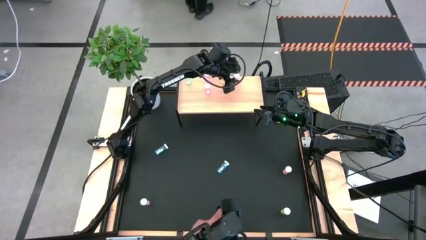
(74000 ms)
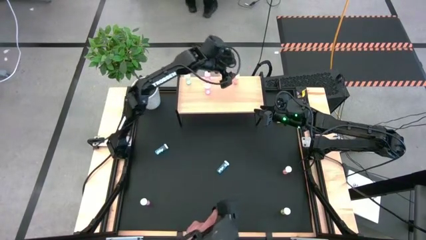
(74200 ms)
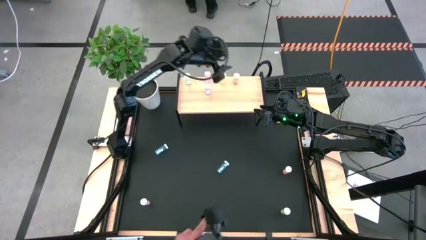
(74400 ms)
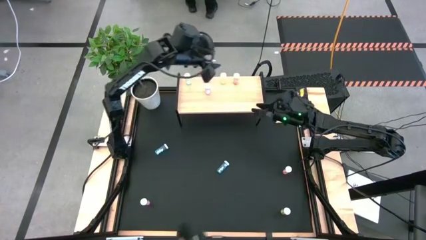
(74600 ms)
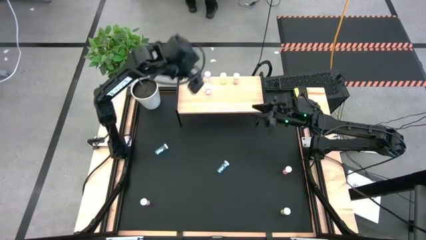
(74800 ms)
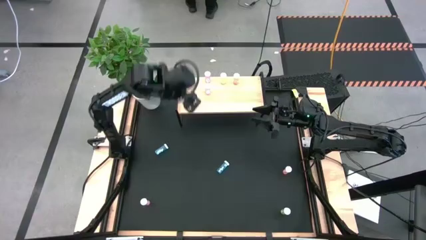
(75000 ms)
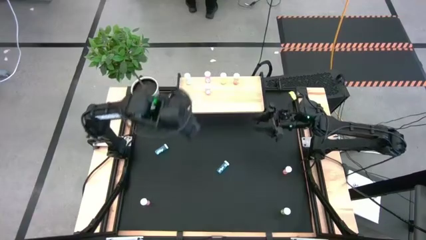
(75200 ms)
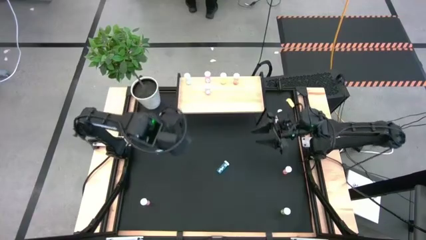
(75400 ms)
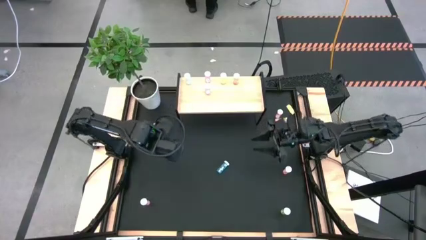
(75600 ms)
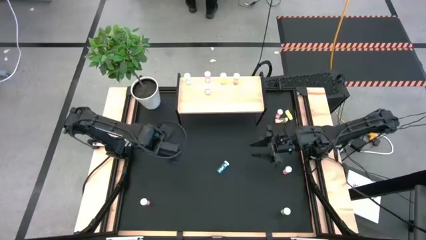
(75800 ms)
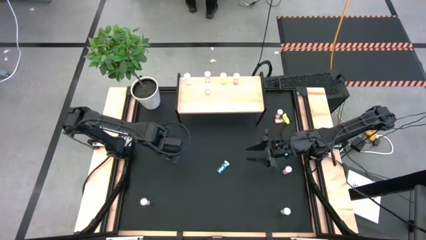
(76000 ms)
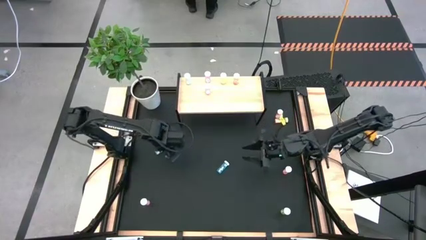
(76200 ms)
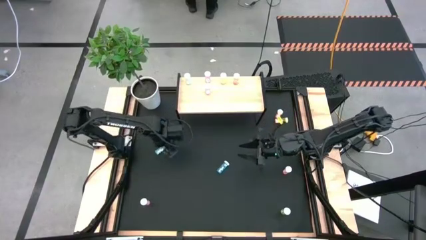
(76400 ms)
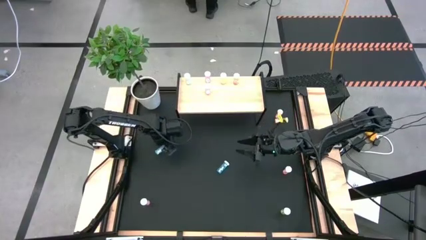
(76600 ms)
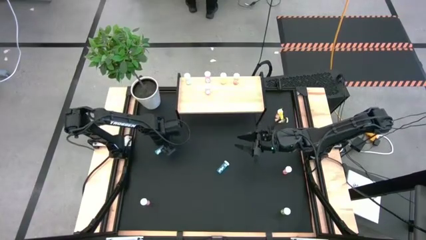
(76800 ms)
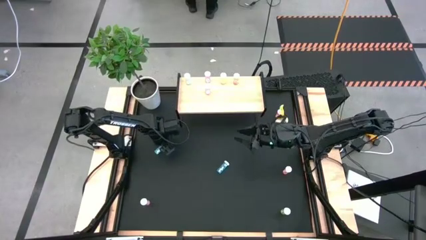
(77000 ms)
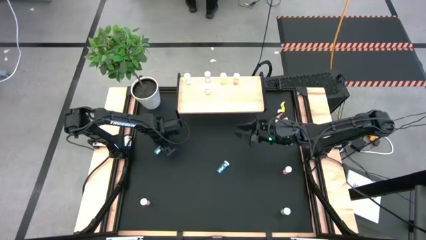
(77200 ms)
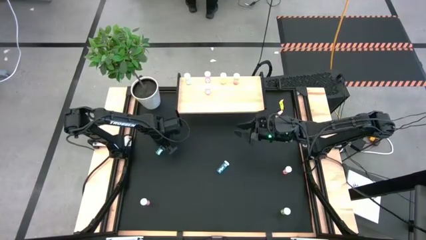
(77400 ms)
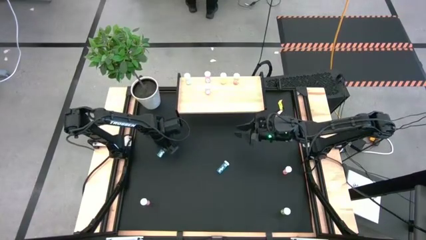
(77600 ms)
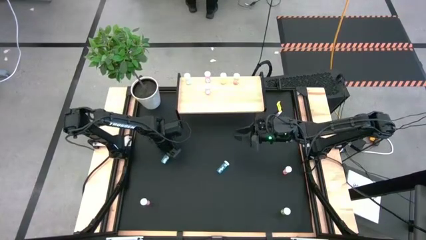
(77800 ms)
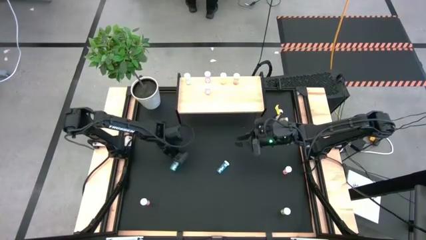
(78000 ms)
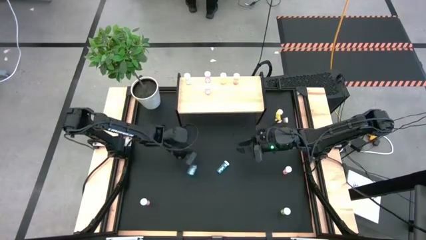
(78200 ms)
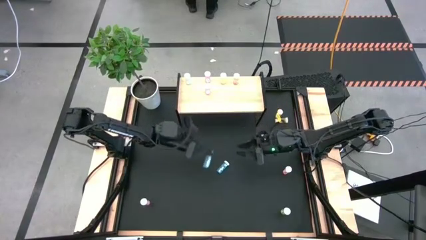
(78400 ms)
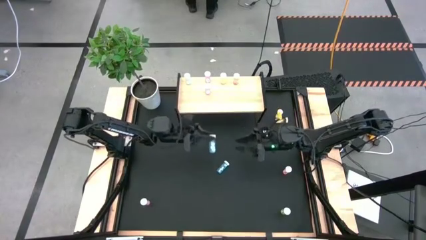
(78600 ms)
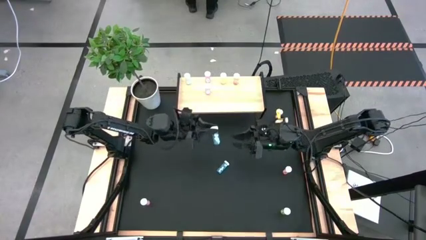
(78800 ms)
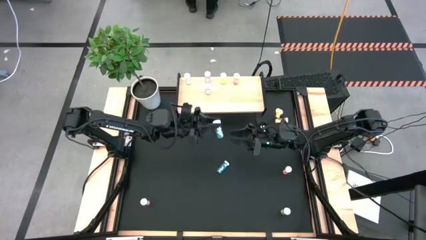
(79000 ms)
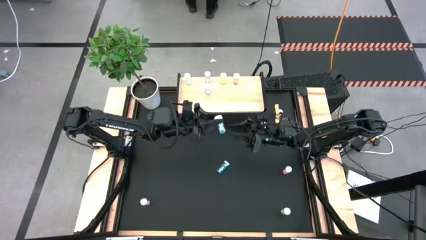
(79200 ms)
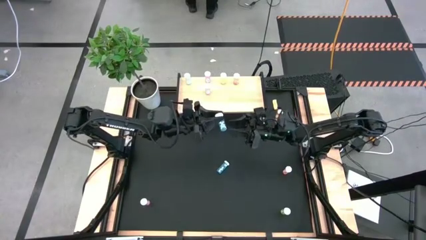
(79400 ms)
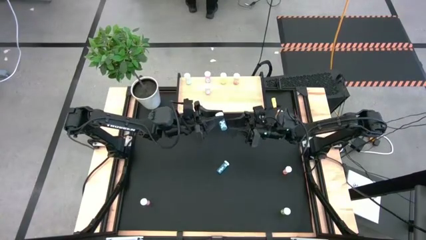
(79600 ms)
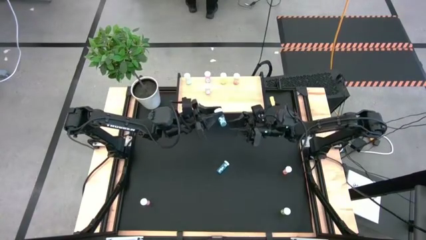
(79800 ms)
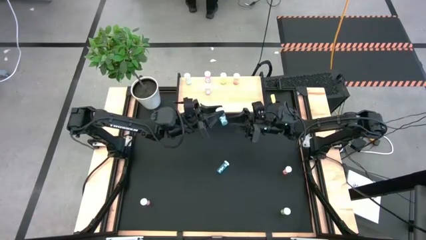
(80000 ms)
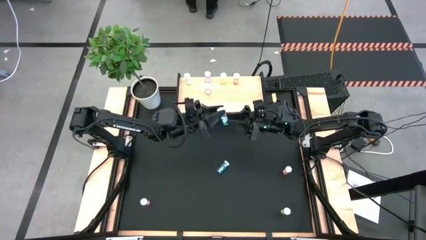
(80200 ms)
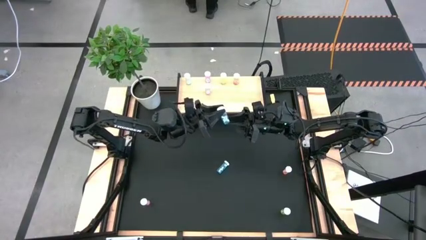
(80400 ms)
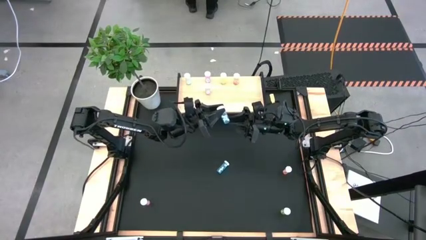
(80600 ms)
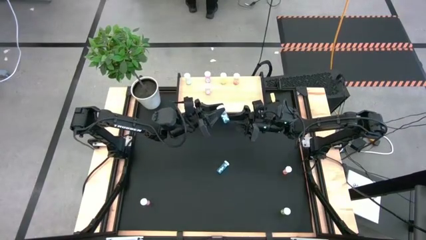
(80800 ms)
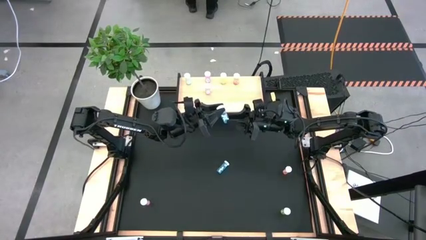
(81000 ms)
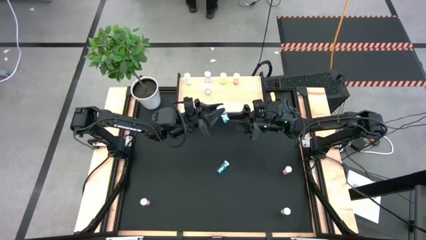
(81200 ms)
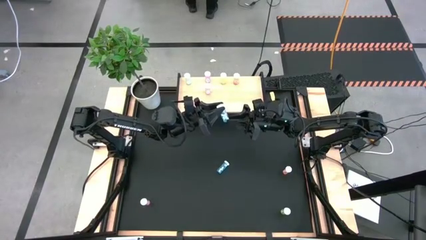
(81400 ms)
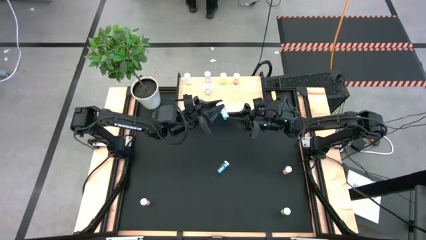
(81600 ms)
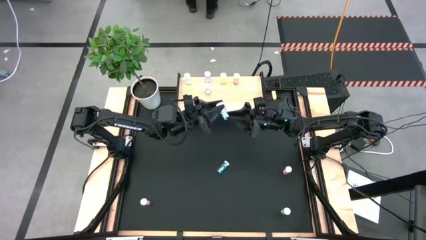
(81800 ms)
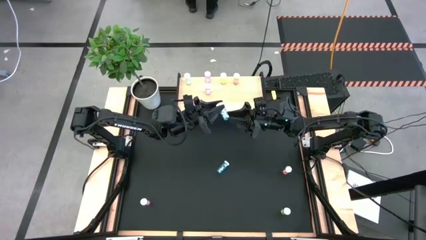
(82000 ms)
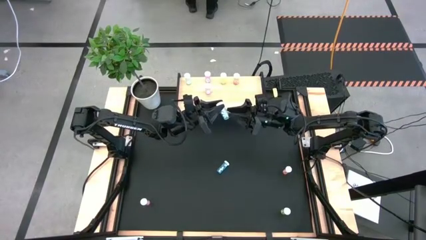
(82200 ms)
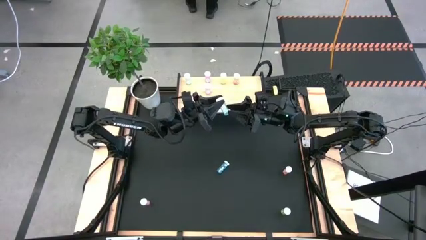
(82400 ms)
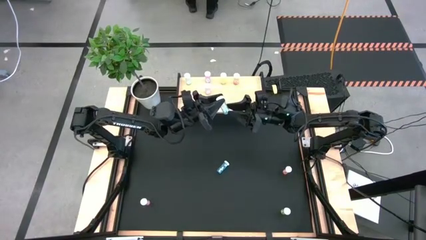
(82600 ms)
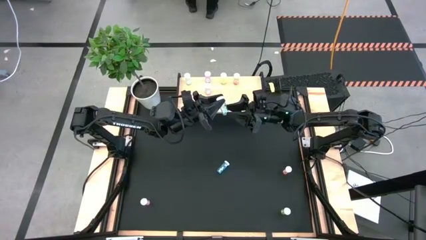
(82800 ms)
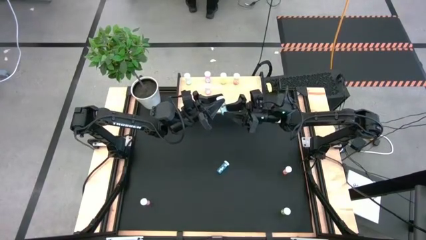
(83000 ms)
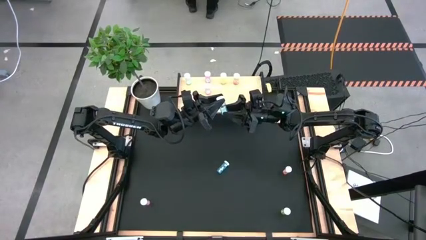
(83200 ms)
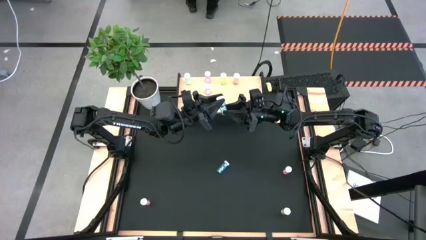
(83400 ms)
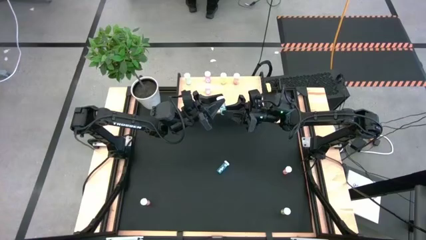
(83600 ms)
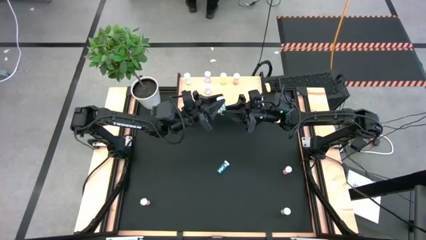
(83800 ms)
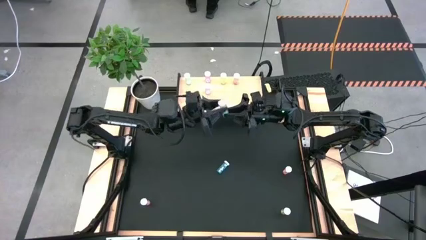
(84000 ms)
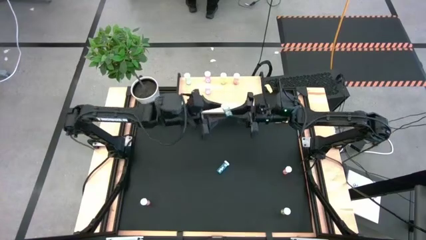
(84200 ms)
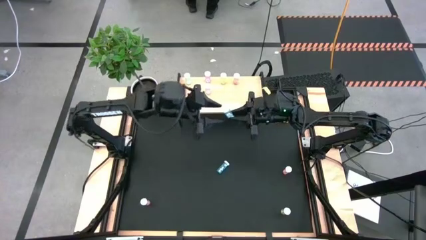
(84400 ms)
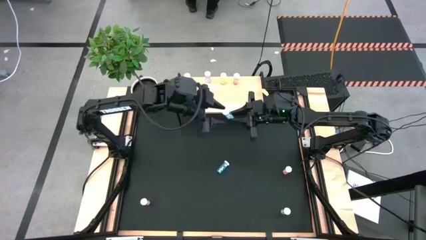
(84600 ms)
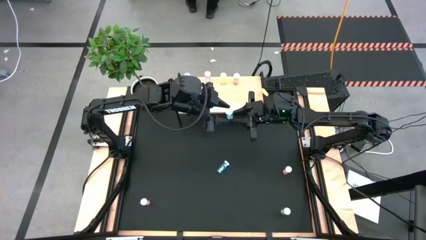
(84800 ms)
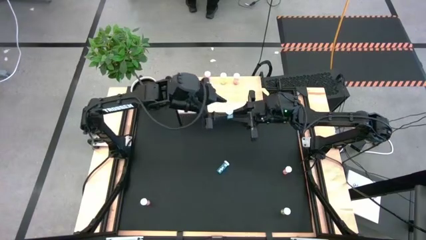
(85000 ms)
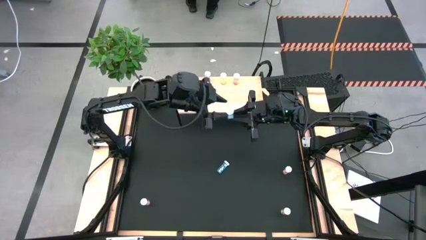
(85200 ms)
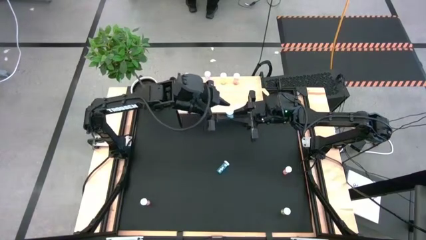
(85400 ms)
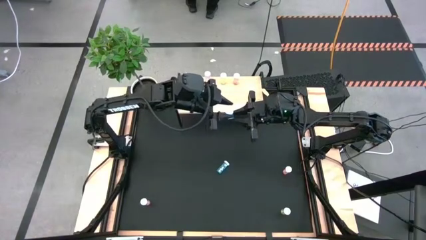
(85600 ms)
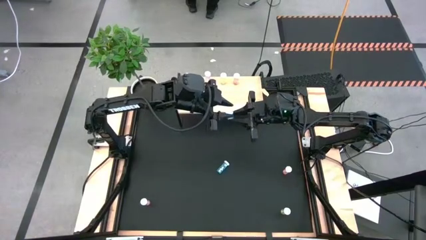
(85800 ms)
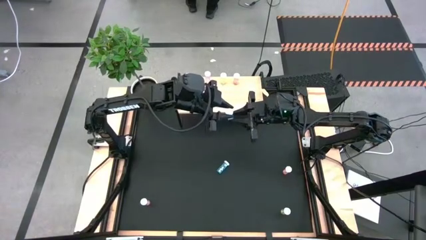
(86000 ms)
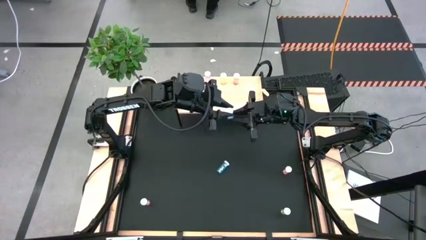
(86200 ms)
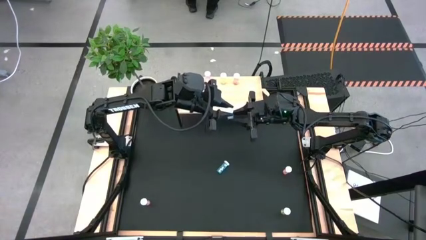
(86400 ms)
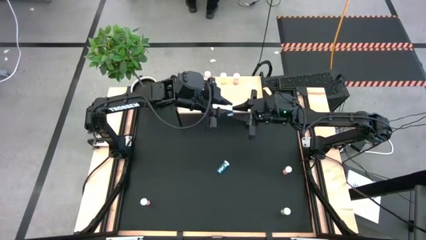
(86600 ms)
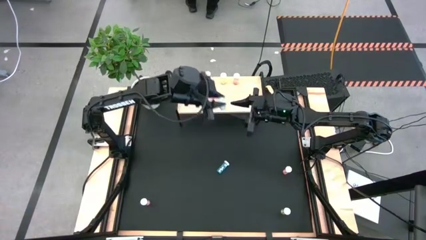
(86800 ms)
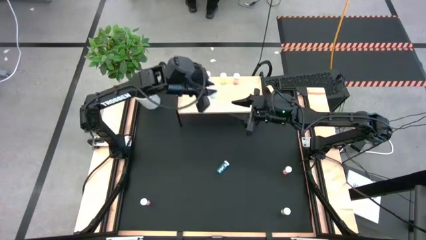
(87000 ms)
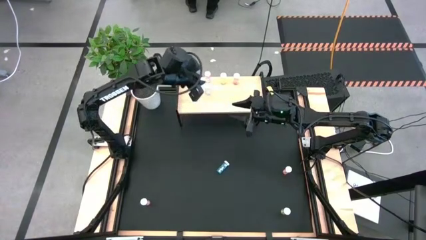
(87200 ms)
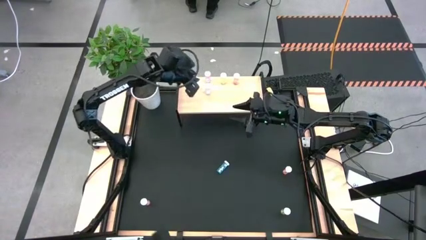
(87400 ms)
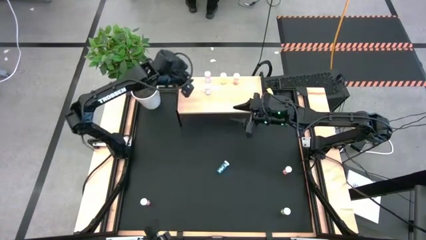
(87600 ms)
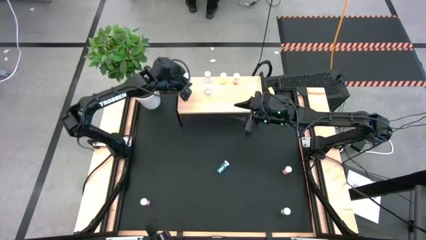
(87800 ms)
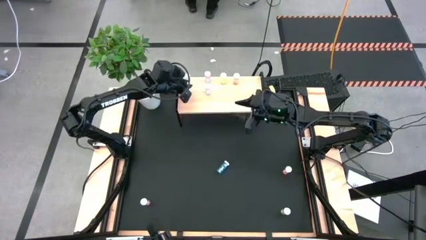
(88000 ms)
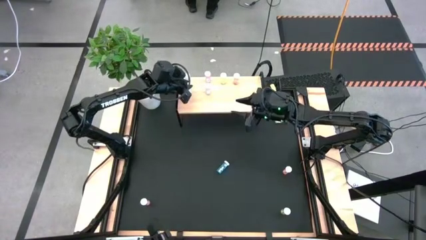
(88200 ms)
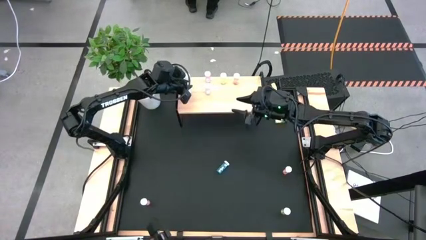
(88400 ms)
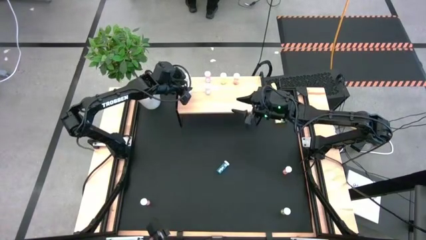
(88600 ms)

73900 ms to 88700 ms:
Task: Pick and place medicine bottles onto shelf by color
Put the left blue pill bottle on the shelf aligned with the other blue pill bottle
